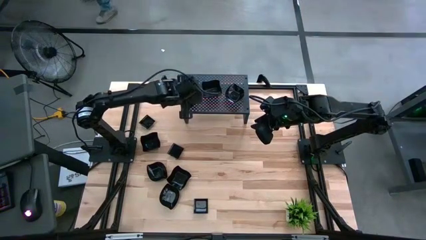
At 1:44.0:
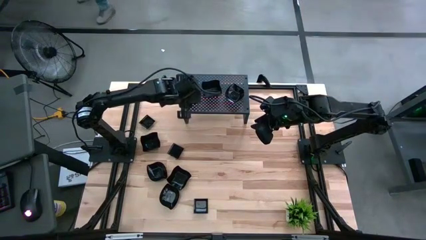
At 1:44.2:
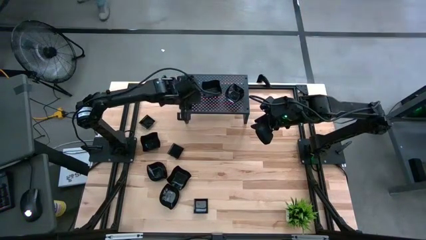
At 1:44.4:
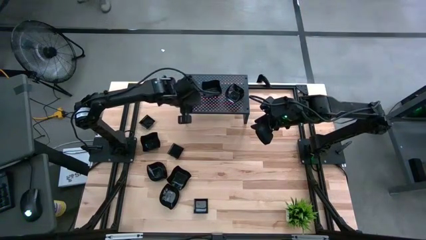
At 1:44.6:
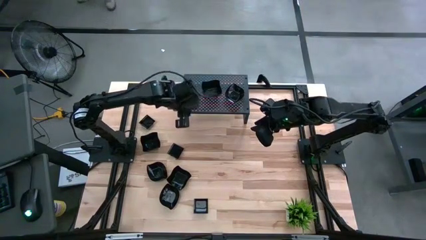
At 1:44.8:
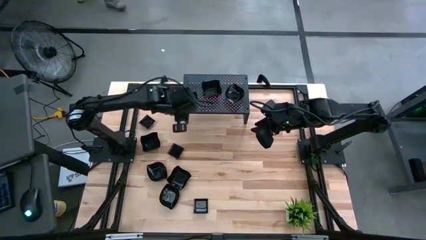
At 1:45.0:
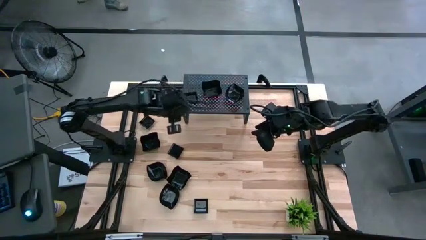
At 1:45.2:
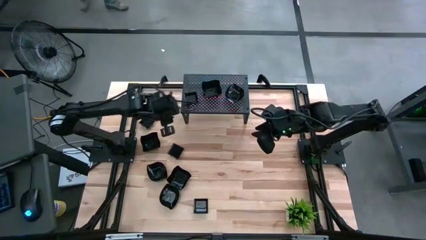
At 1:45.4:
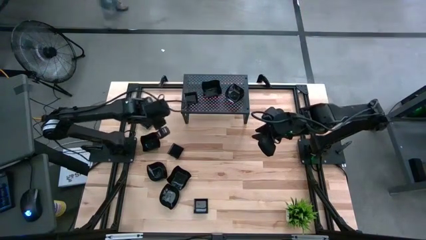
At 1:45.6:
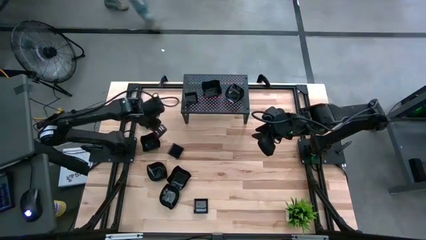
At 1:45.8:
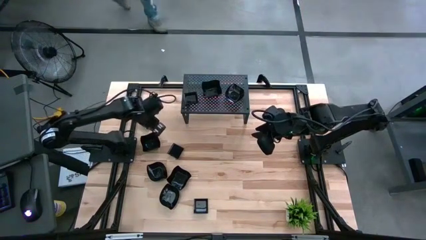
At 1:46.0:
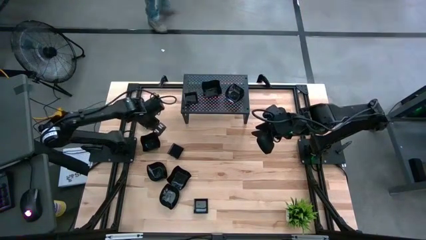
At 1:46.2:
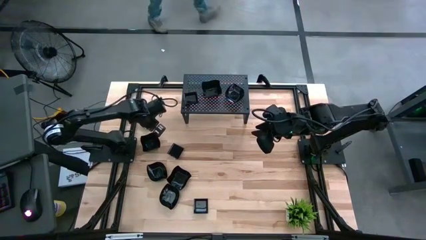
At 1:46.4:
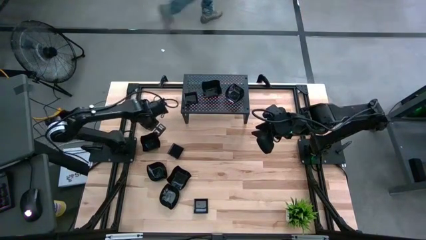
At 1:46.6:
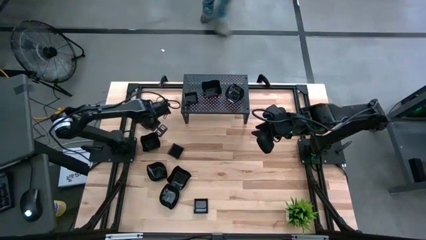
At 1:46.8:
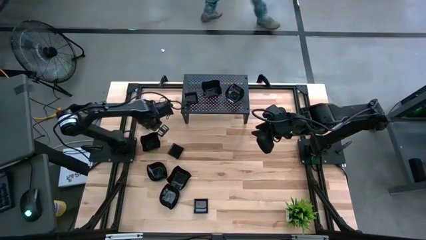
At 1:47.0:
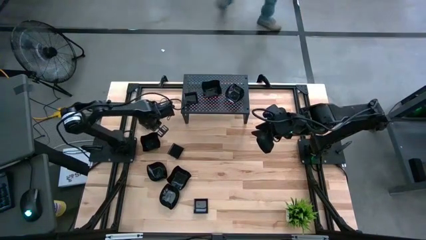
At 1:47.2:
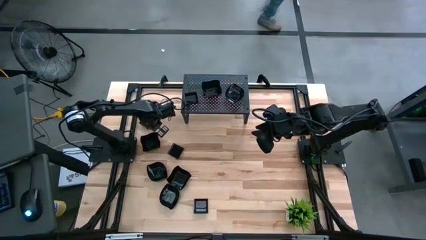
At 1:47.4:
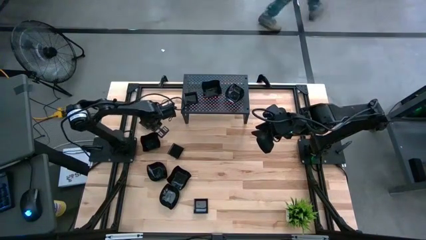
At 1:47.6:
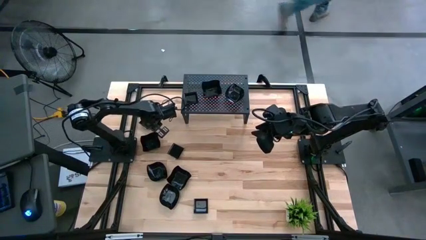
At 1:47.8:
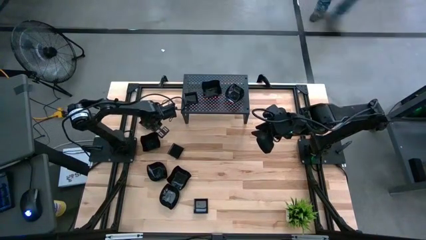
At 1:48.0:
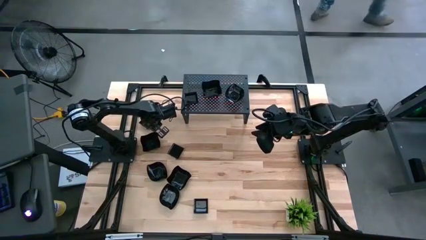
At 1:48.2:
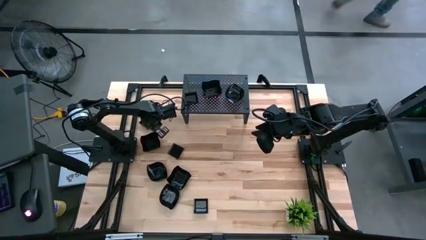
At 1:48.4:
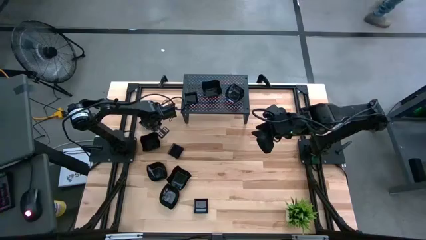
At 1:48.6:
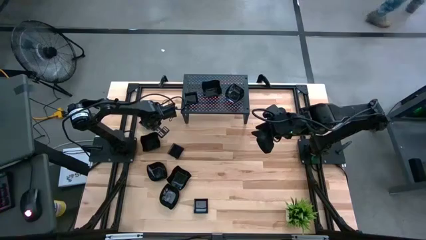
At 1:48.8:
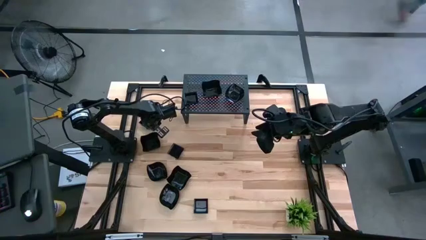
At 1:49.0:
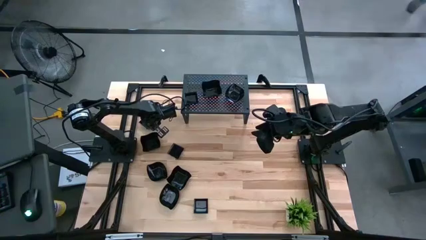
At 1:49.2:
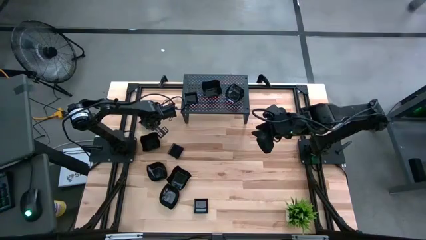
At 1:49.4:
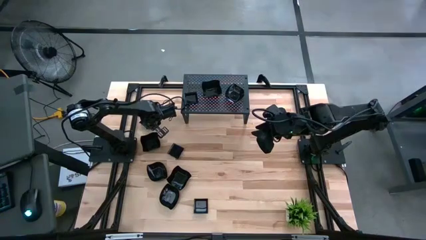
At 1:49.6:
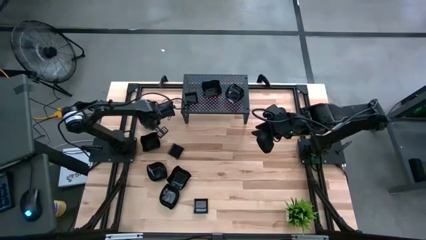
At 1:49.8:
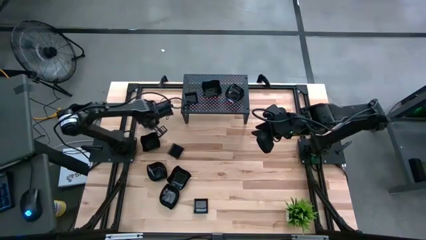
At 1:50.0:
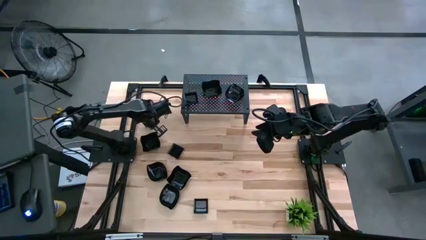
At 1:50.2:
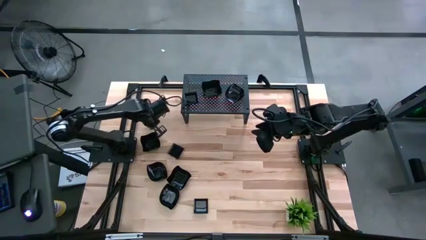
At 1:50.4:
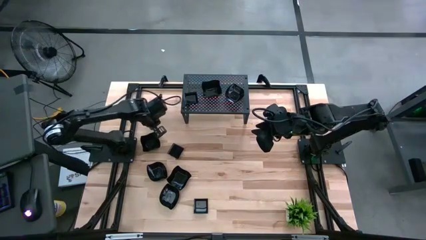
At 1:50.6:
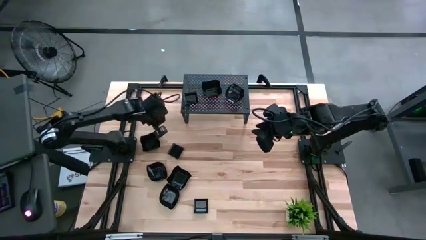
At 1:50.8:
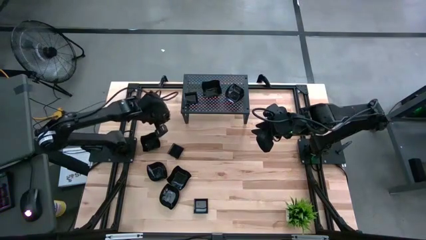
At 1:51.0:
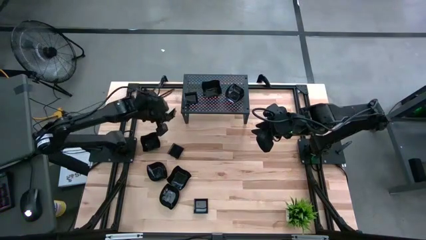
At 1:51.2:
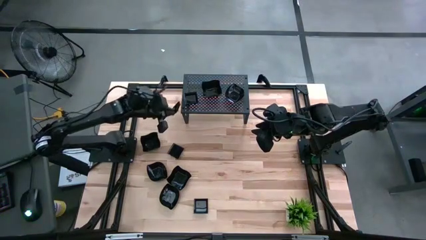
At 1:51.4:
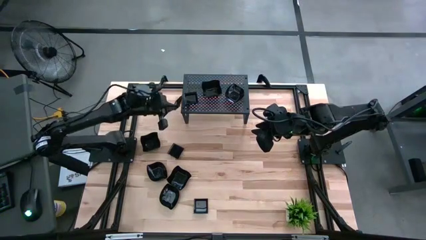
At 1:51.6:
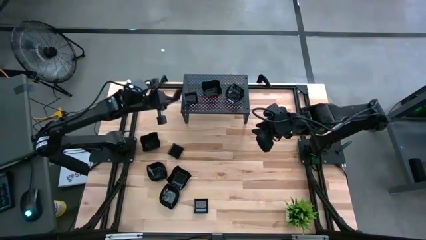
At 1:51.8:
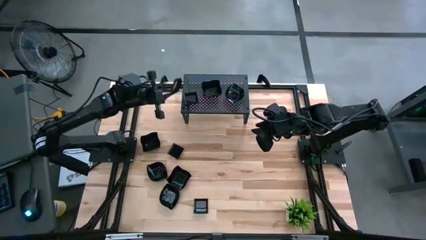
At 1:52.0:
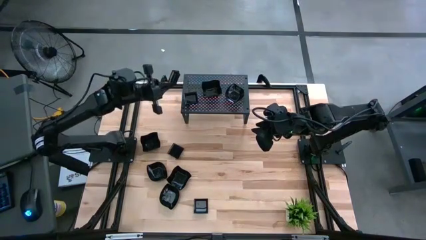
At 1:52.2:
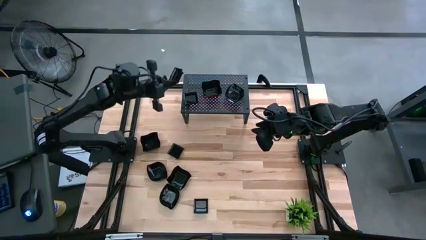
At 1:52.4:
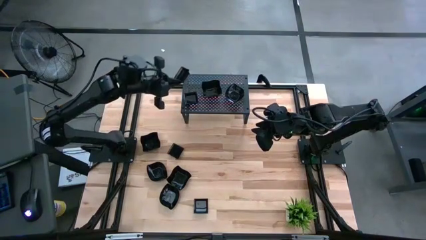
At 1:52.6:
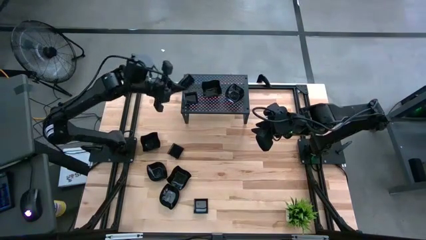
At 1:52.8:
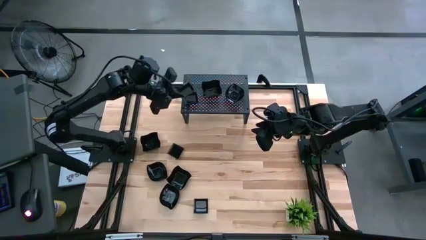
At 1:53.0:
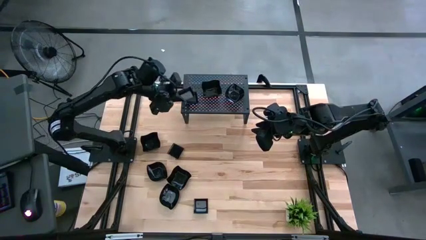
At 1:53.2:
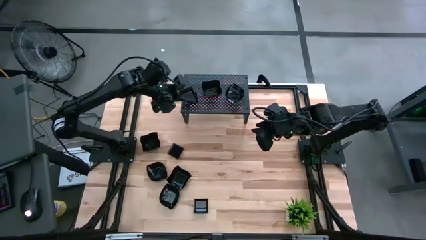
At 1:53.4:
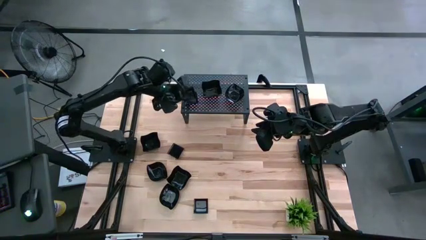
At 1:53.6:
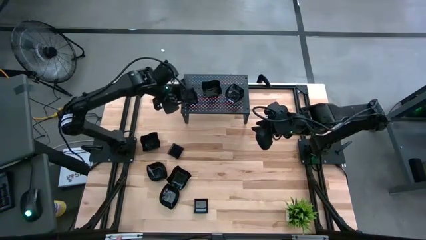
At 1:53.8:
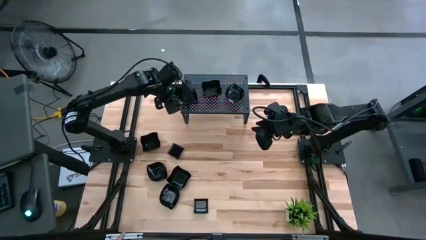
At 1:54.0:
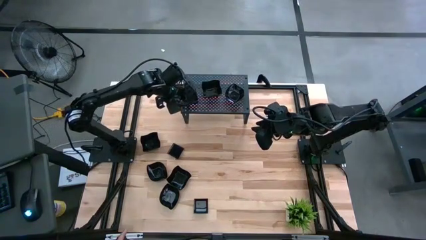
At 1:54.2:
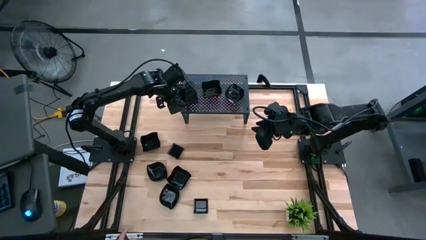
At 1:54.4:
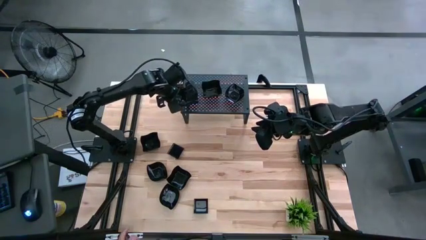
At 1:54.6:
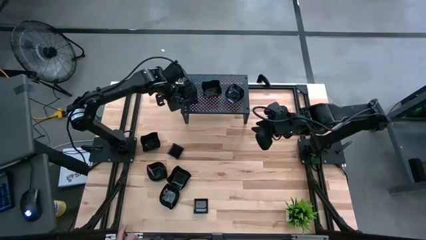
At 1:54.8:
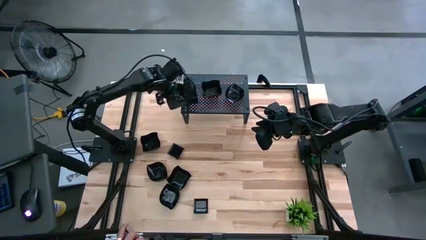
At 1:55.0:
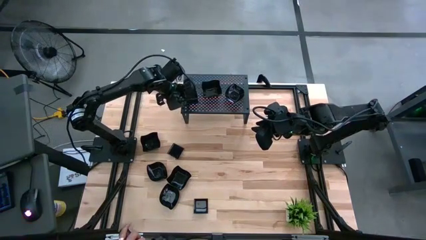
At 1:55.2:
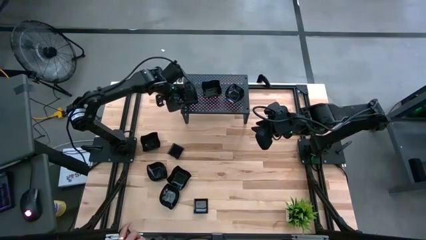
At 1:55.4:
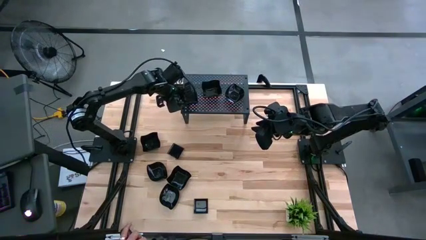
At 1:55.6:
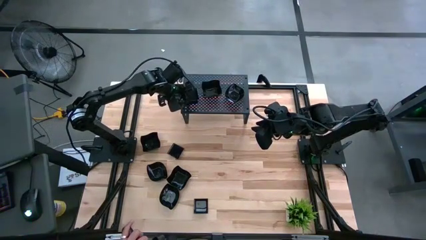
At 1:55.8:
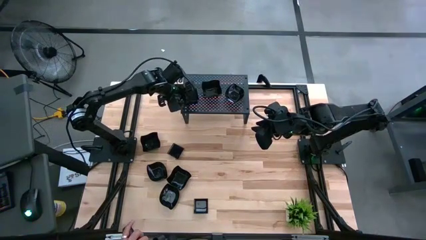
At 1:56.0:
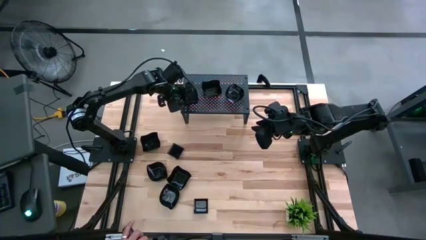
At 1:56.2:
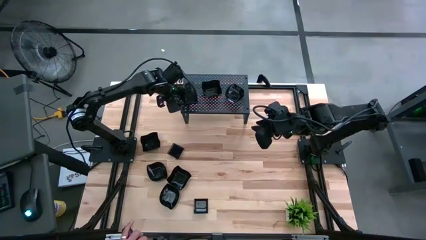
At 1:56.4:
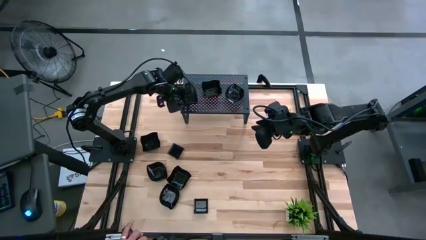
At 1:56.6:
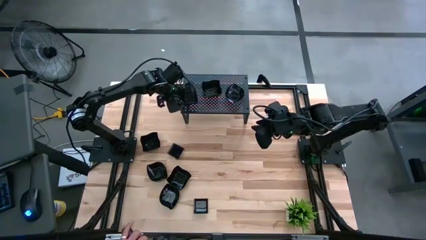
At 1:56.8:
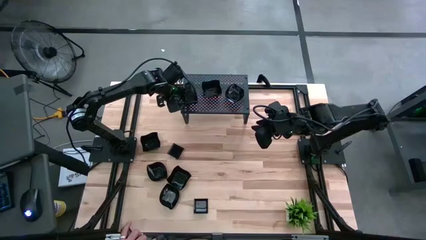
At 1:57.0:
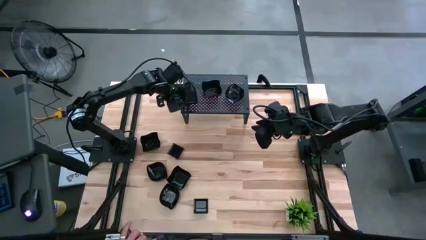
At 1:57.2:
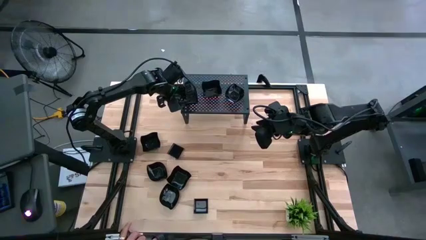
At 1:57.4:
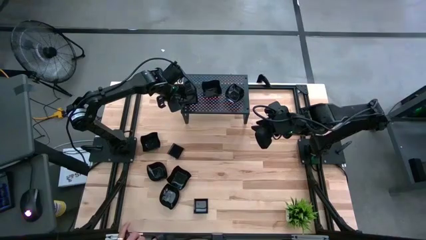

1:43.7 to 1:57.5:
Task: Pick & Place Mini shaped plates
Stack the square plate on top of the square plate on the shelf
